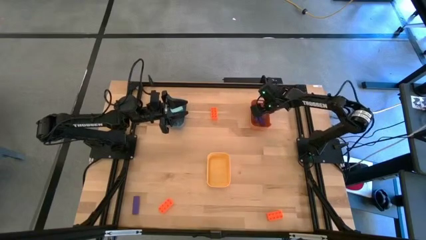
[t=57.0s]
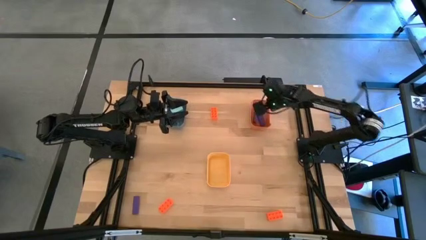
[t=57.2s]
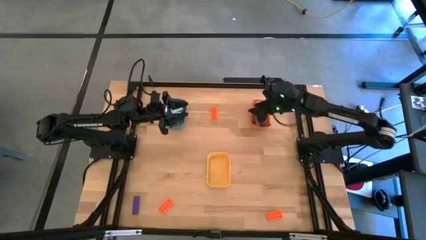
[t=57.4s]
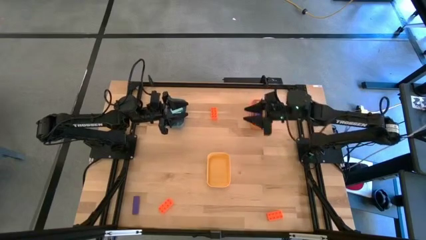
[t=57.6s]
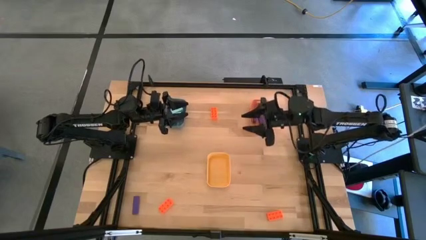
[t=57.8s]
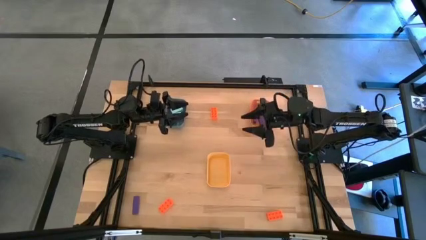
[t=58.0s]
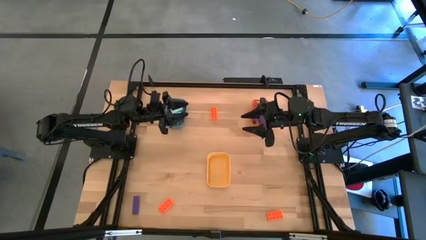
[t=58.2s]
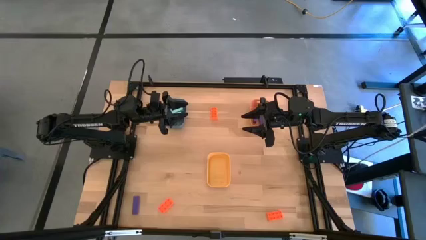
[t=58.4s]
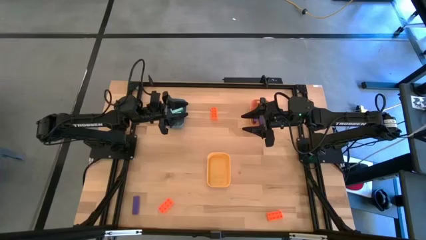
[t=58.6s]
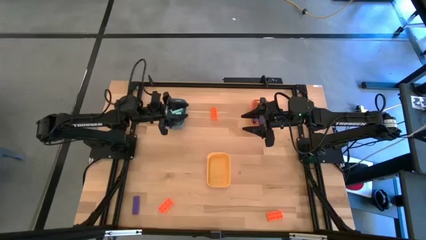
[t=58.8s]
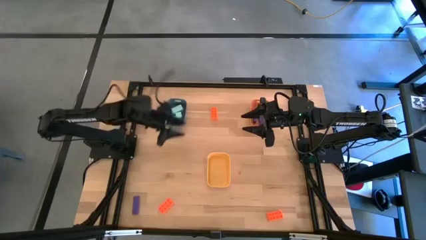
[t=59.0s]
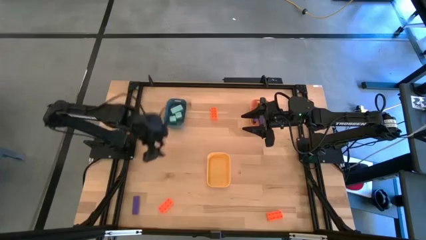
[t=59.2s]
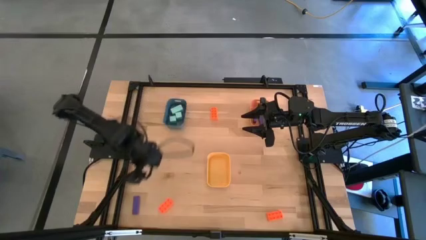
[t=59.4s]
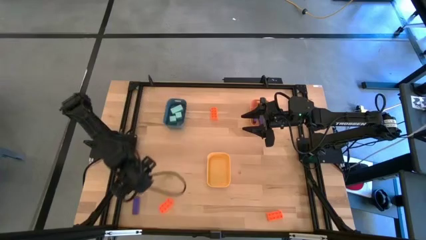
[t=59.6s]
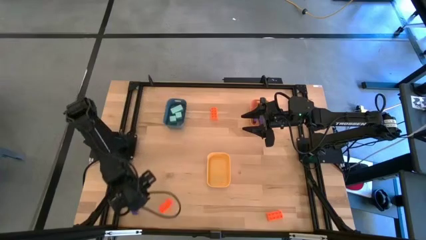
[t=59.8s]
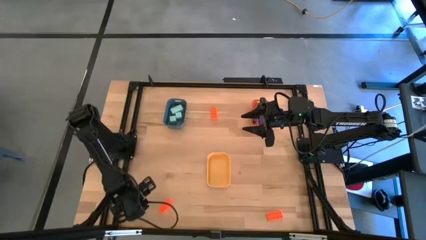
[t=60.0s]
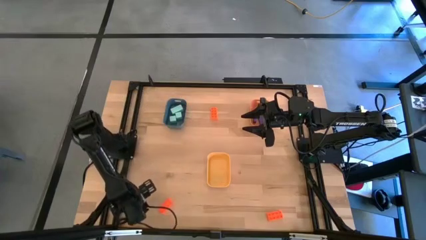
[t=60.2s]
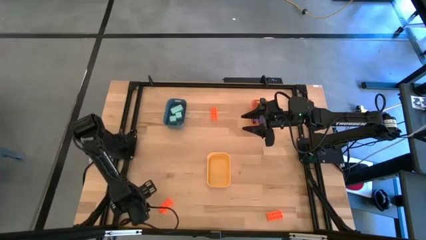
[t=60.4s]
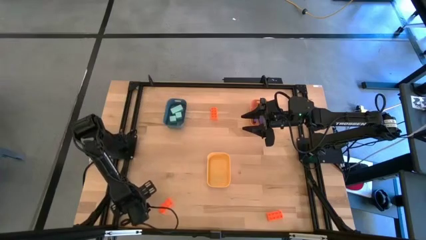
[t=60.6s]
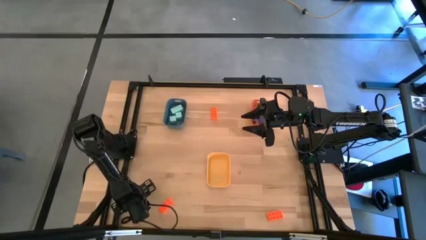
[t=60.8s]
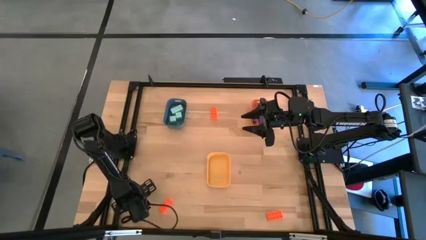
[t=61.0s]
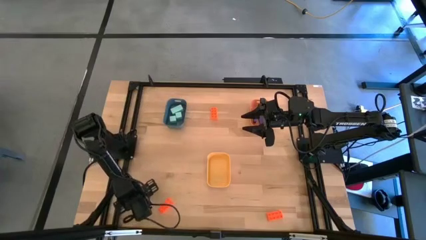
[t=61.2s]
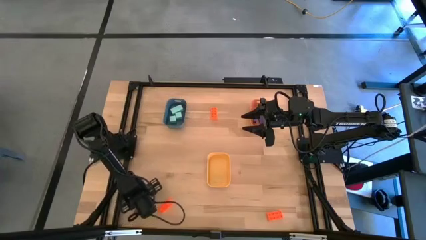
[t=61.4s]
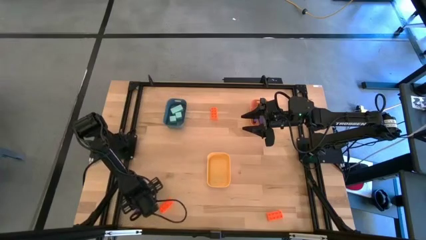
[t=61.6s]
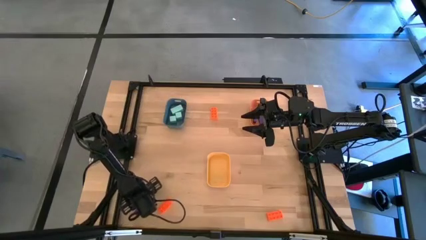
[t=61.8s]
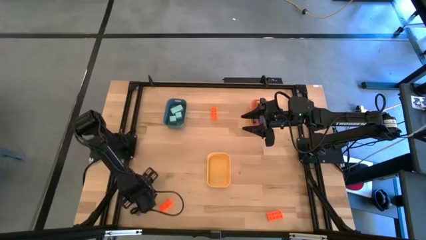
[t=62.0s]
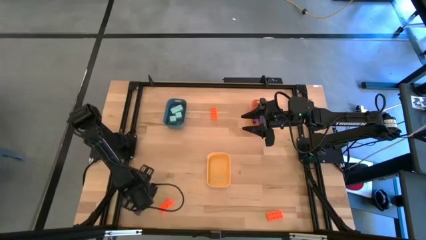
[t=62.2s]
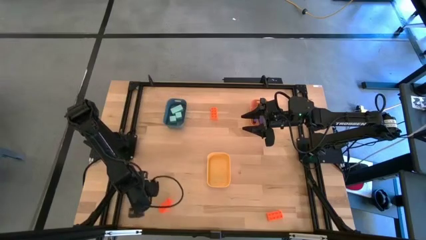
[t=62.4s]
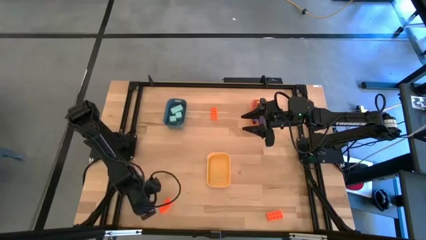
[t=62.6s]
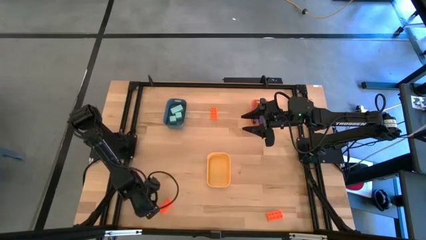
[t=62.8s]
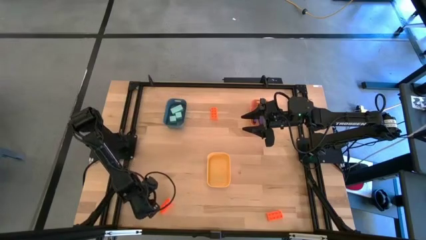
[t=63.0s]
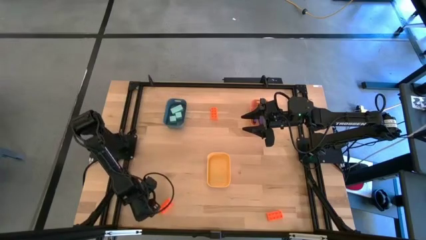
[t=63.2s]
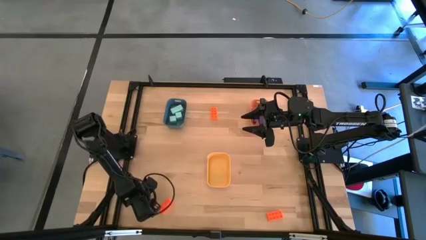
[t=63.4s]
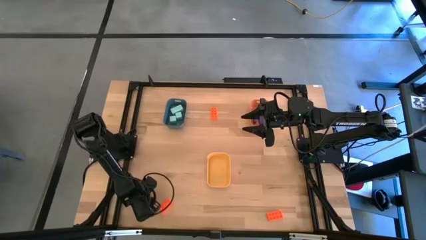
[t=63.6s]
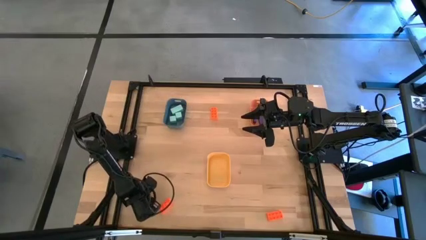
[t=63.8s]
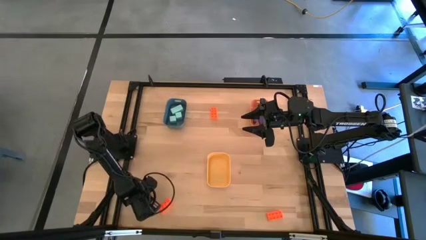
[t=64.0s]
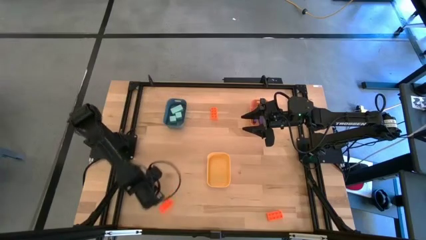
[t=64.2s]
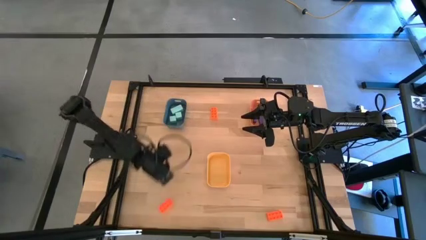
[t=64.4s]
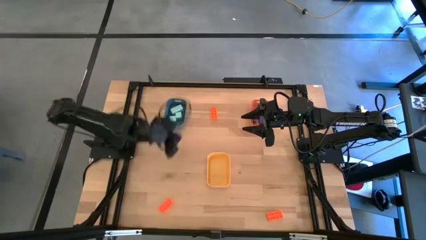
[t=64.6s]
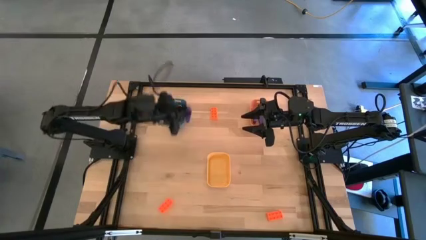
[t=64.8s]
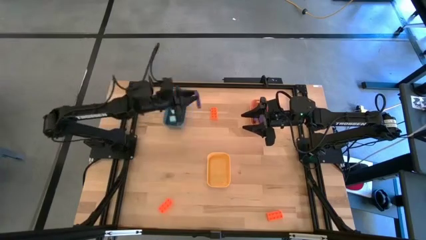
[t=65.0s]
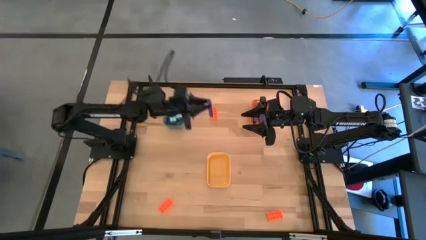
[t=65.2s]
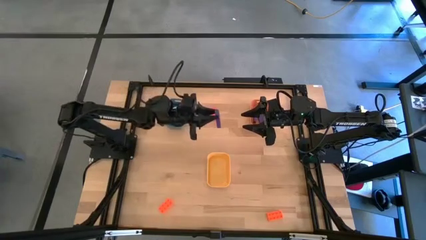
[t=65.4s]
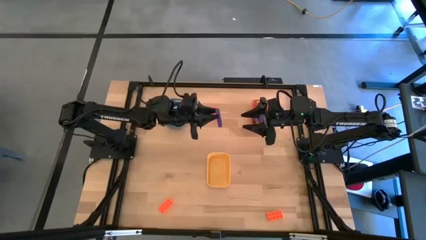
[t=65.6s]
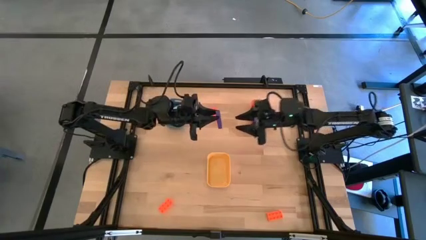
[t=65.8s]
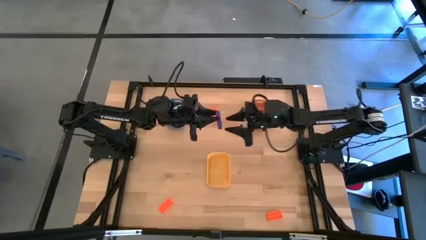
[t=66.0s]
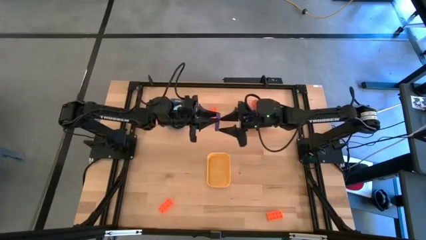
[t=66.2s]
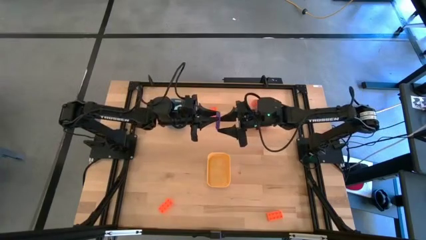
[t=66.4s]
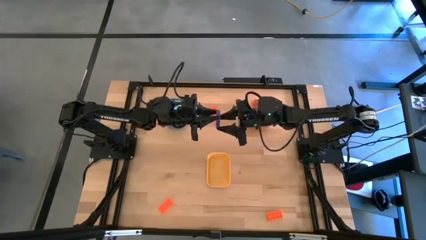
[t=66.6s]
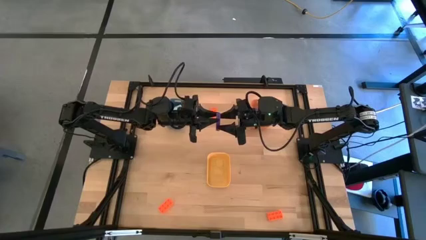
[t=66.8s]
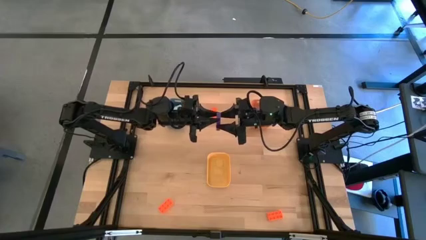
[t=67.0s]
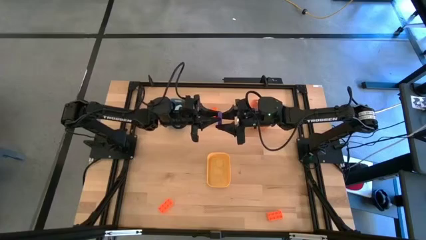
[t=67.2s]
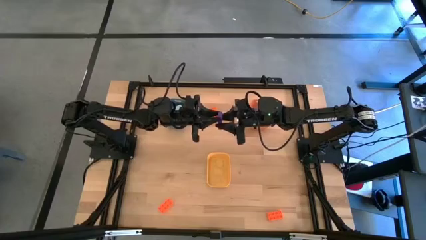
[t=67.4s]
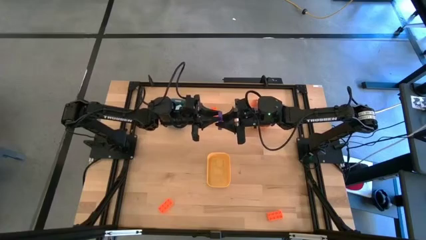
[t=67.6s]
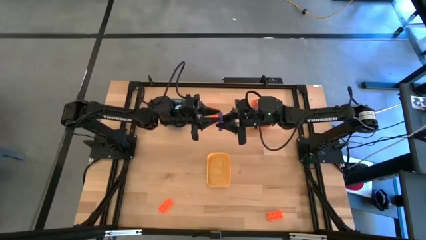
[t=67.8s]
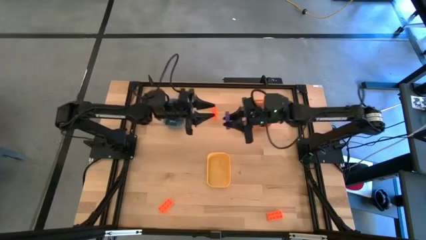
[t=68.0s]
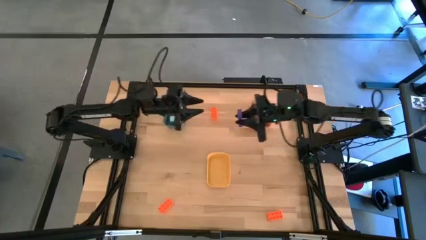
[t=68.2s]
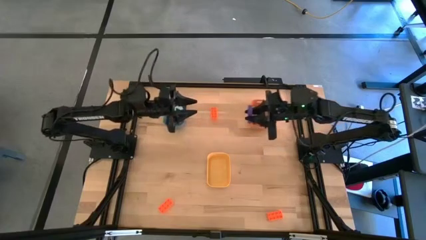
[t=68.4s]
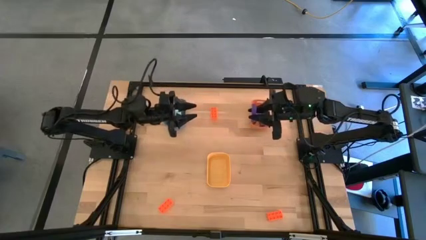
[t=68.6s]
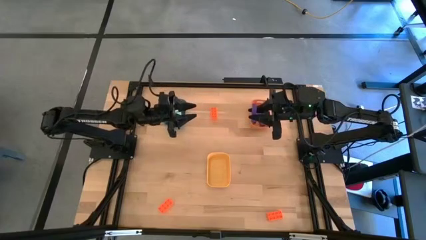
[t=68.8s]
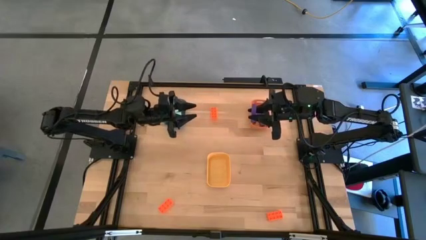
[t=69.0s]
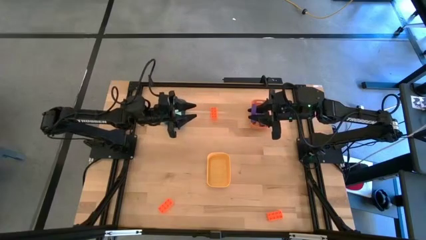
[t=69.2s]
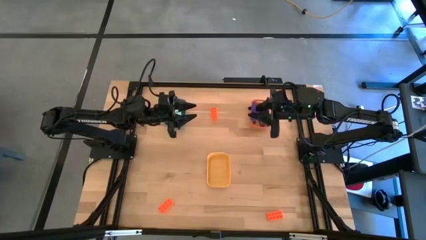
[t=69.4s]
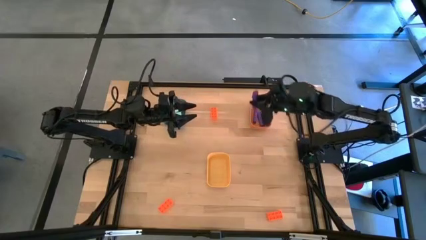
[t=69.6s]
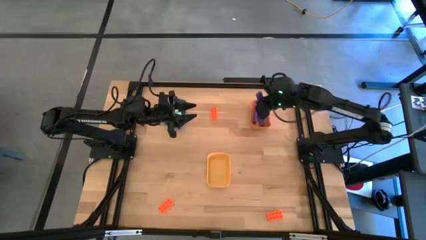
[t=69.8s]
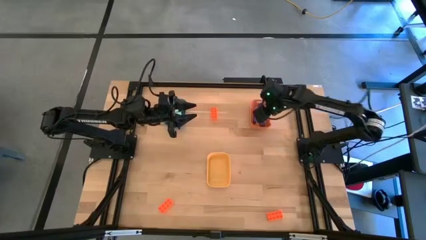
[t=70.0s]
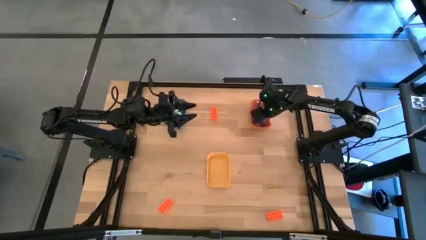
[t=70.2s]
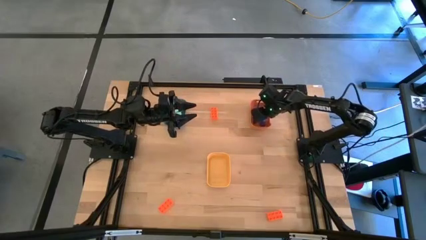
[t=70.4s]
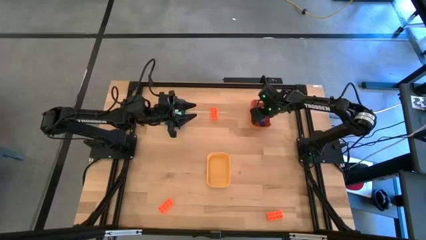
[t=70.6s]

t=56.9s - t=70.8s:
Task: Sort & place blocks by color
Put the purple block into the orange bin
